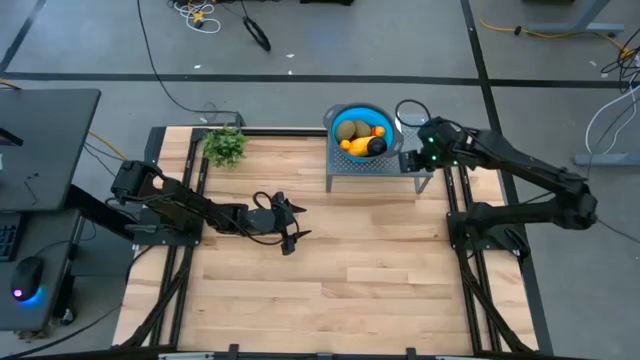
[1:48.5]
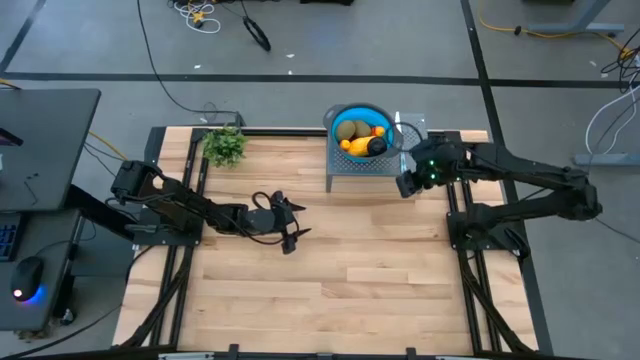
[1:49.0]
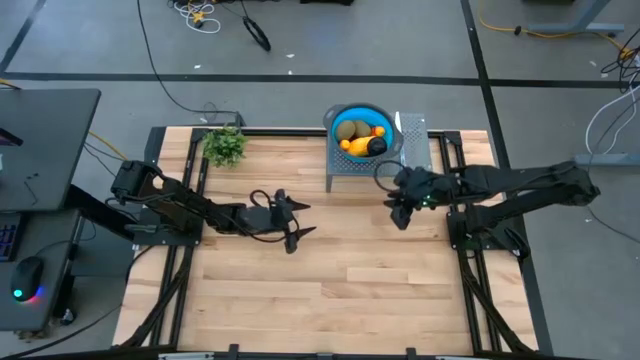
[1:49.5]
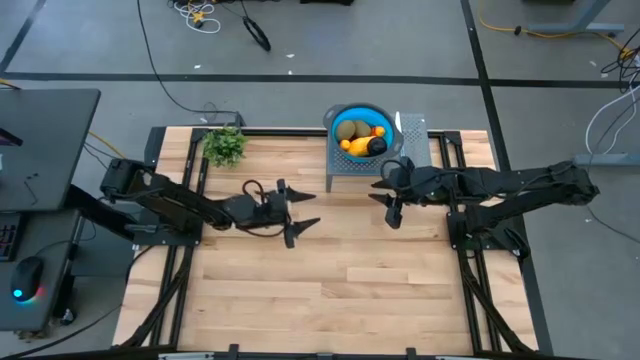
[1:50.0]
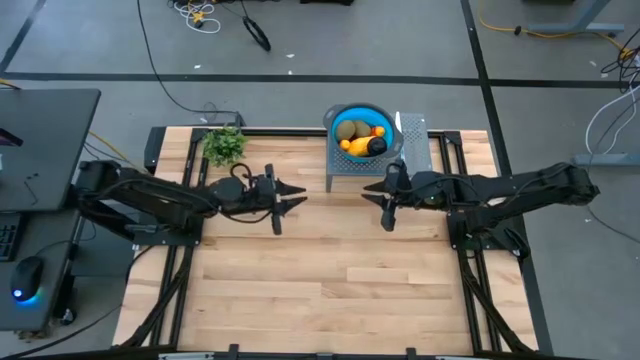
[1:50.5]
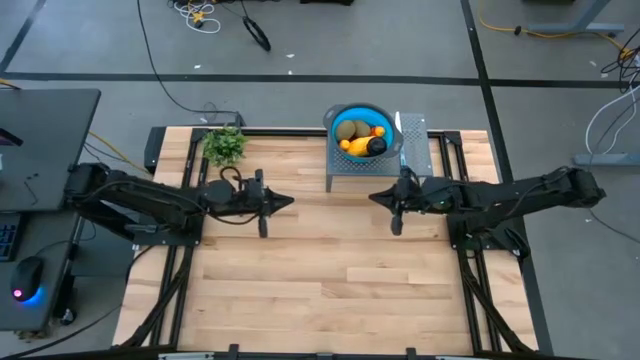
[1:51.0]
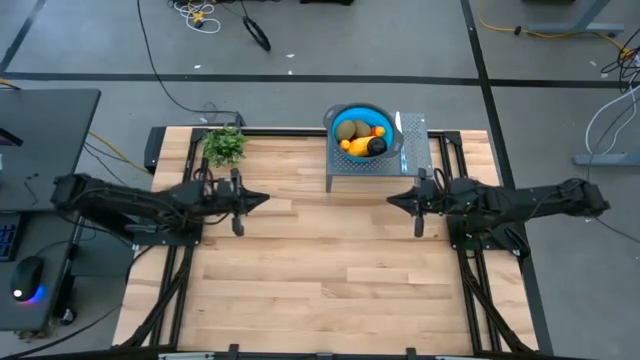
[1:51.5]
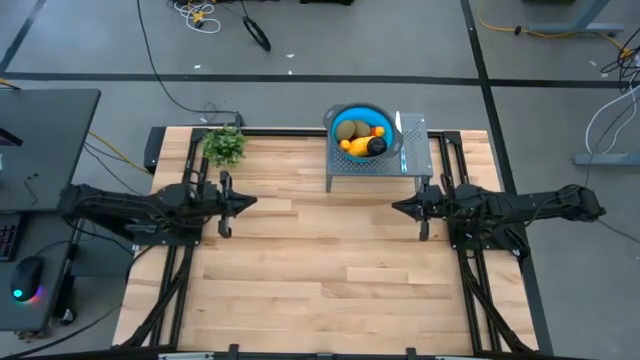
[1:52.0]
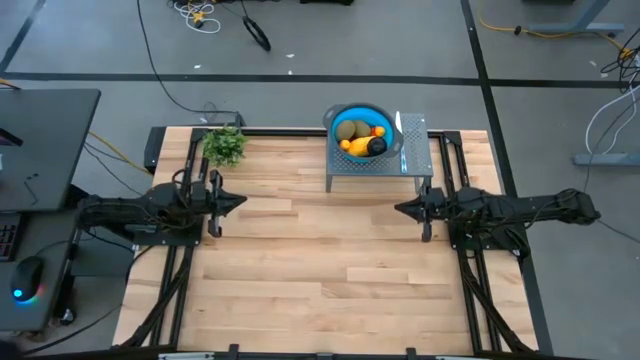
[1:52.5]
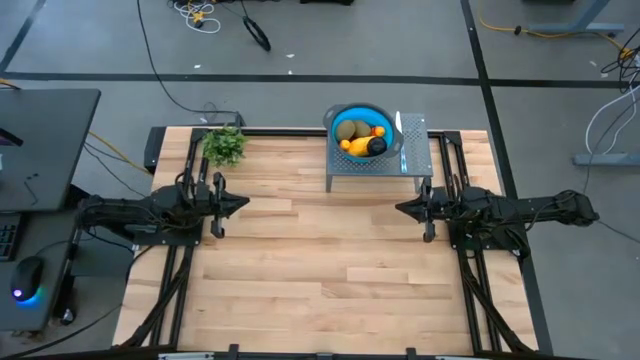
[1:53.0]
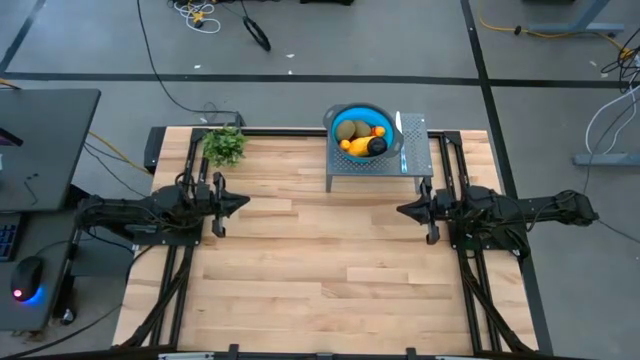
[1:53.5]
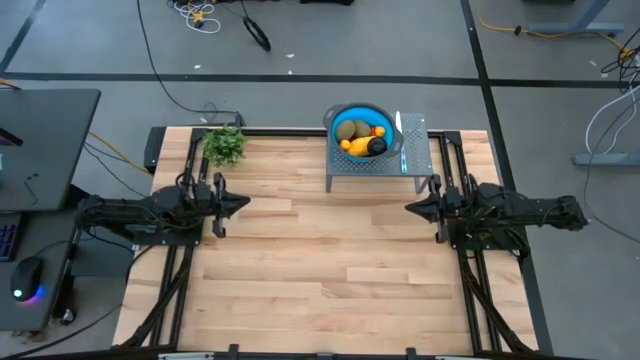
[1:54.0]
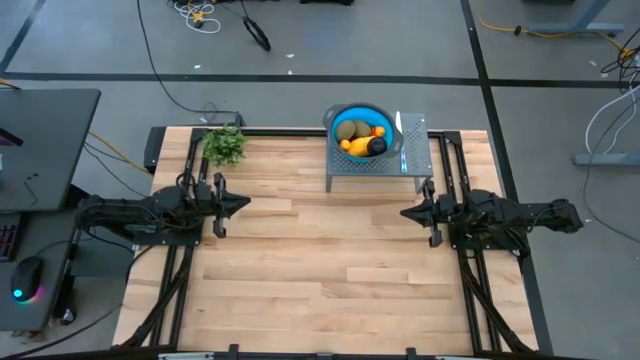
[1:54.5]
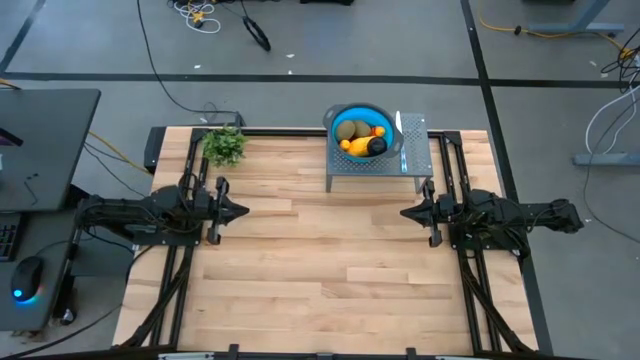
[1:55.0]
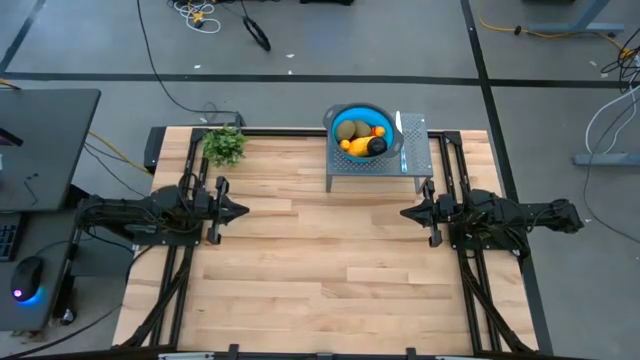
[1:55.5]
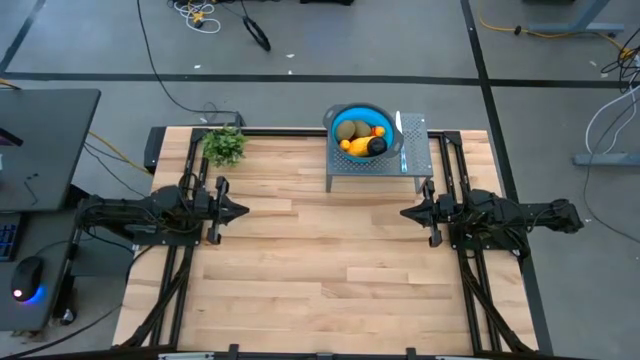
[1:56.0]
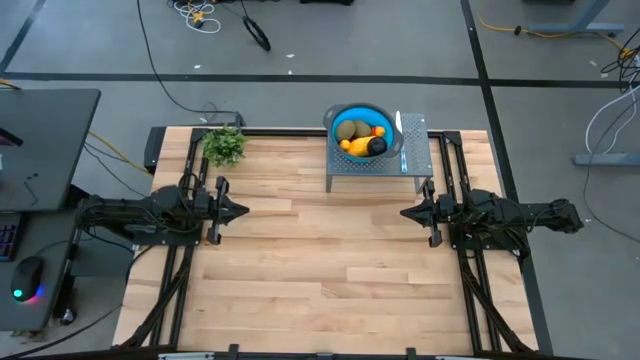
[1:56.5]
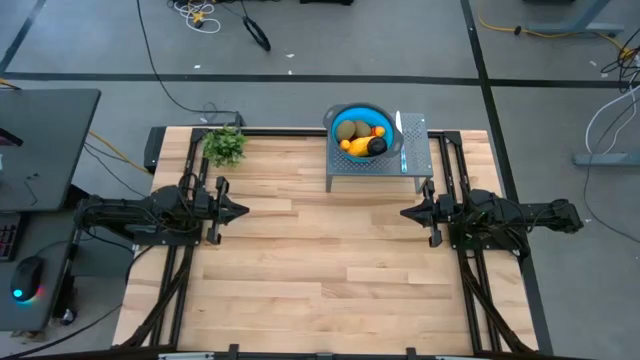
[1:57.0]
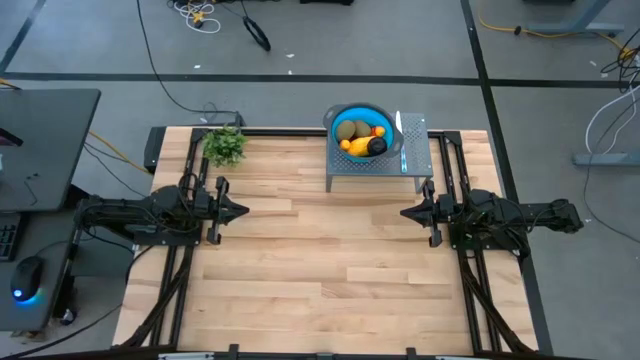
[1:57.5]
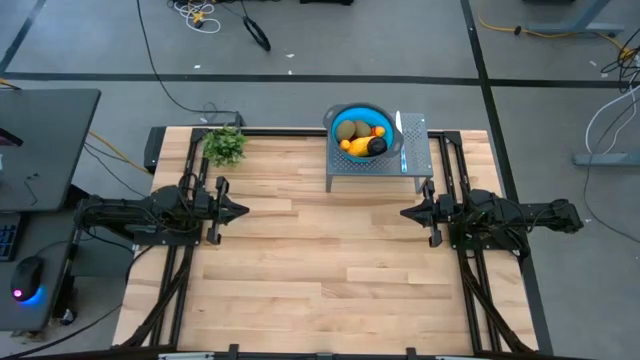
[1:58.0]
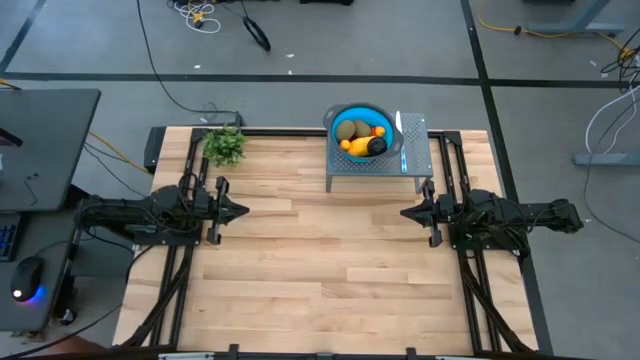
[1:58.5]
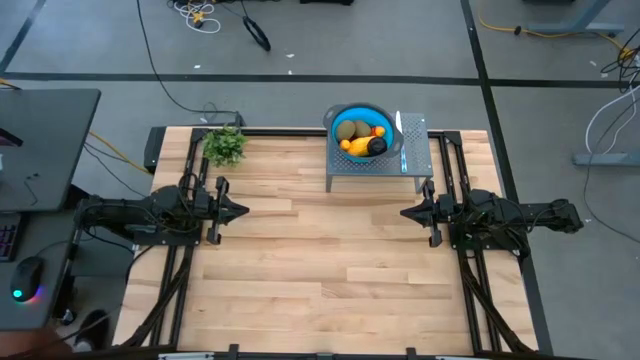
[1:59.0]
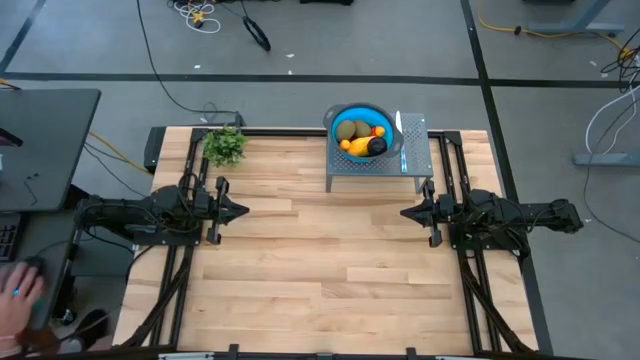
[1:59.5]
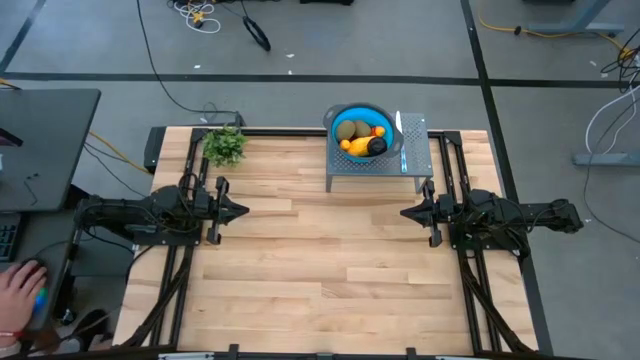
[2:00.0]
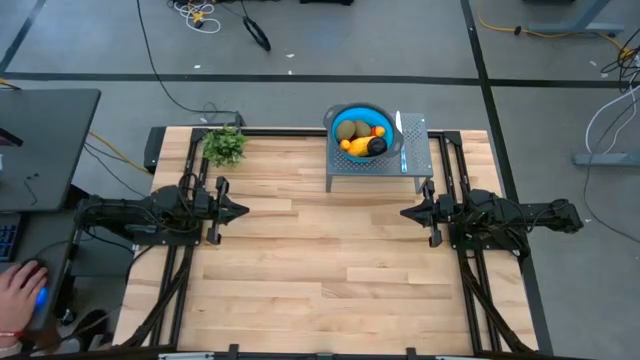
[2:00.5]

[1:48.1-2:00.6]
Task: Pick & Place Fruit
Return To Home Position

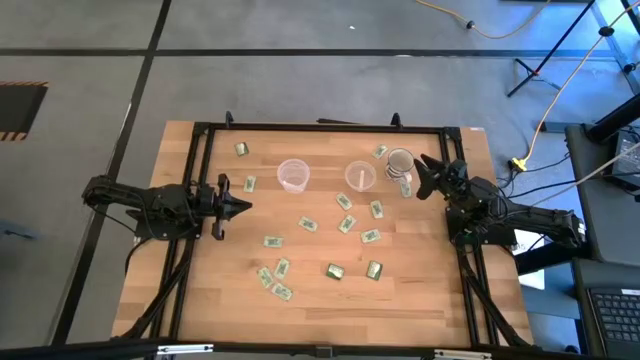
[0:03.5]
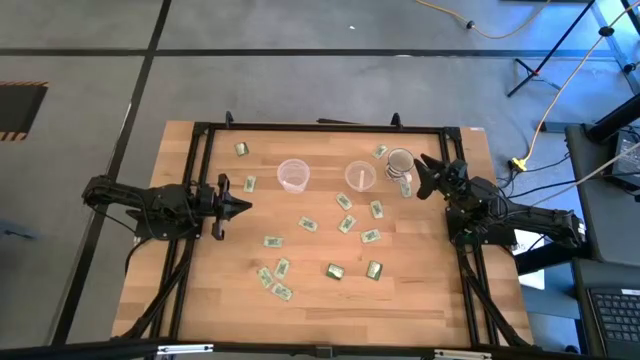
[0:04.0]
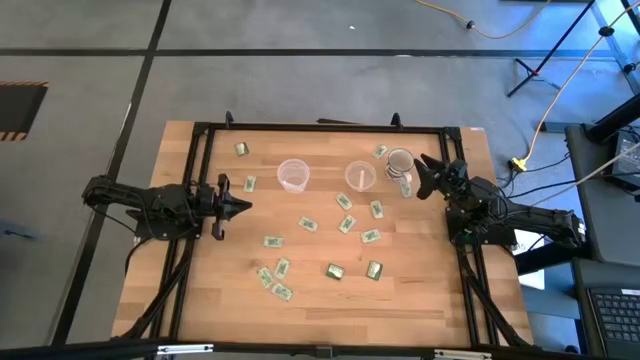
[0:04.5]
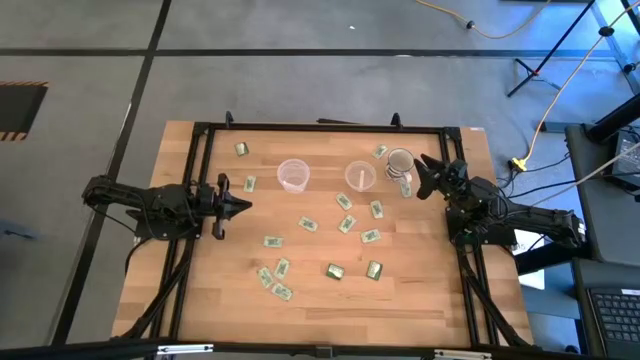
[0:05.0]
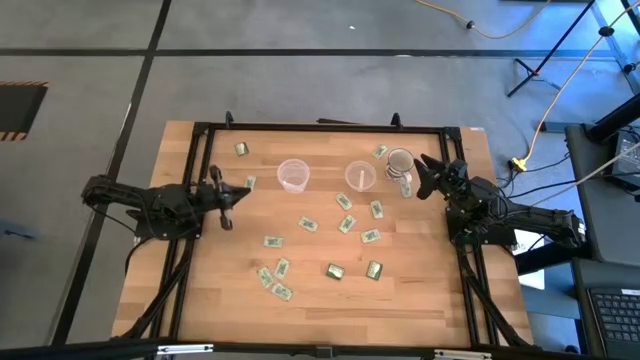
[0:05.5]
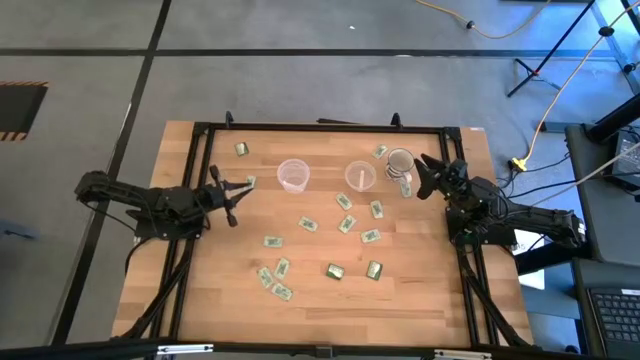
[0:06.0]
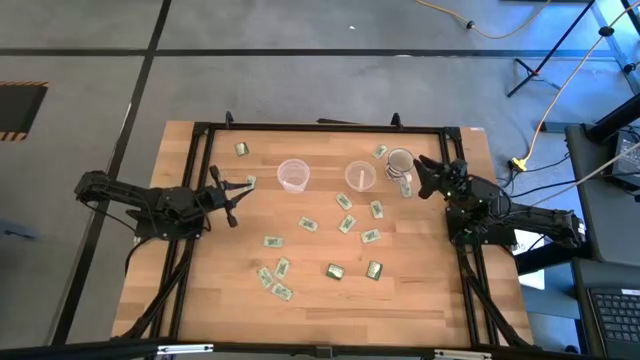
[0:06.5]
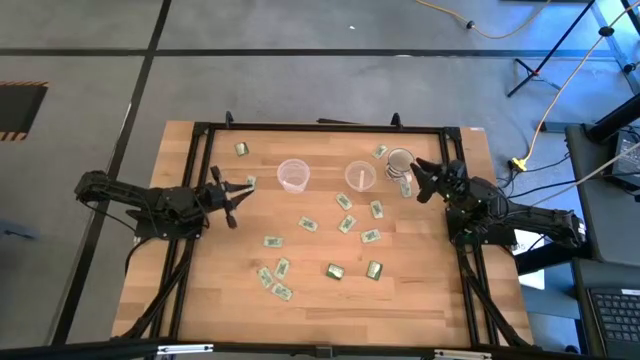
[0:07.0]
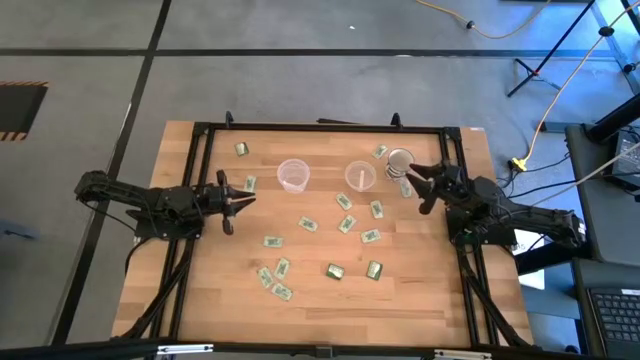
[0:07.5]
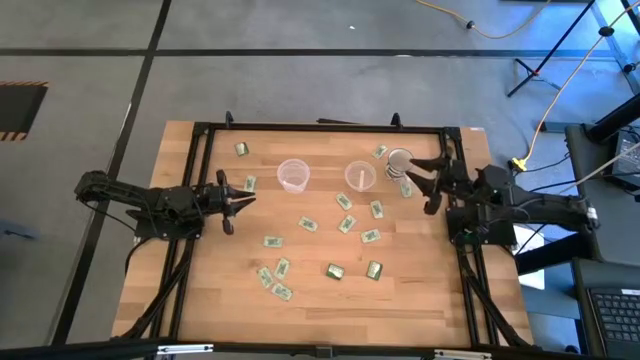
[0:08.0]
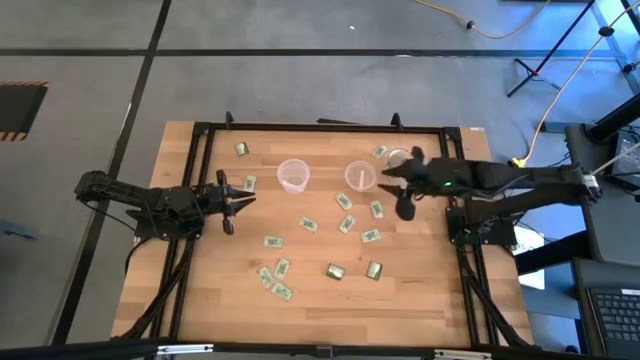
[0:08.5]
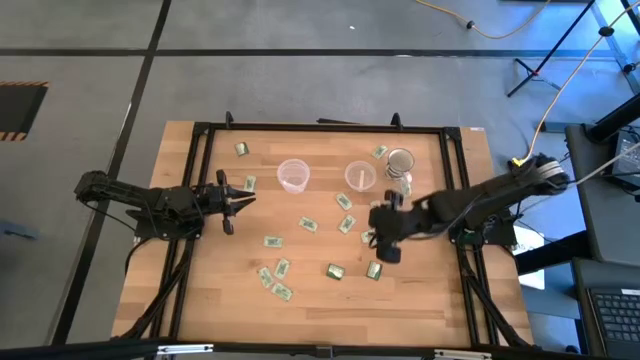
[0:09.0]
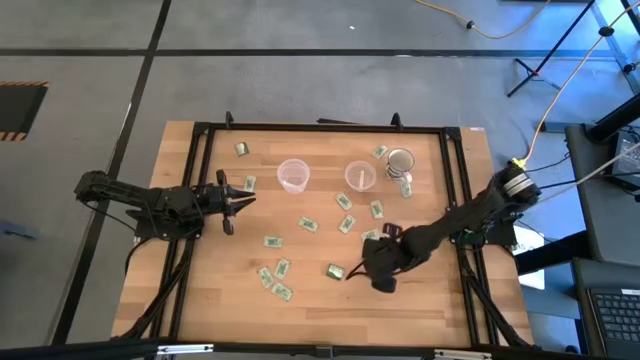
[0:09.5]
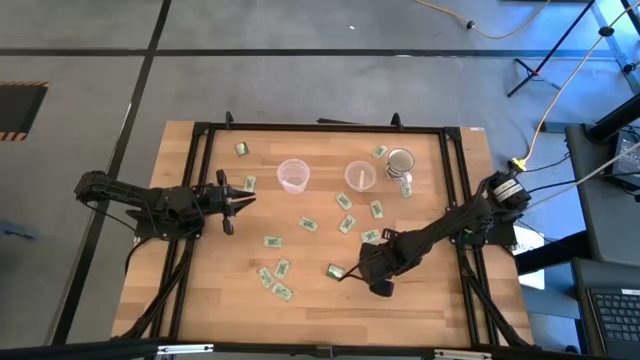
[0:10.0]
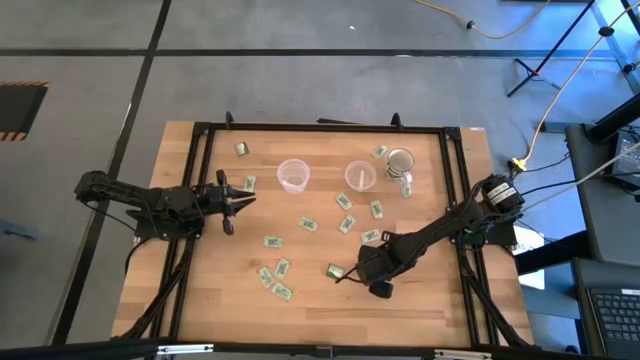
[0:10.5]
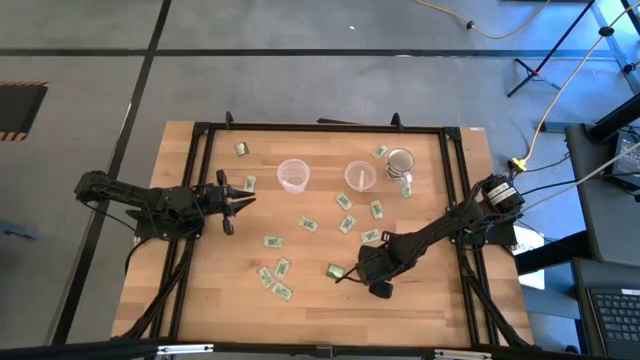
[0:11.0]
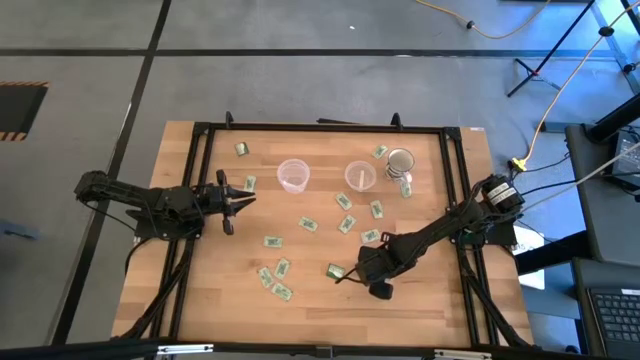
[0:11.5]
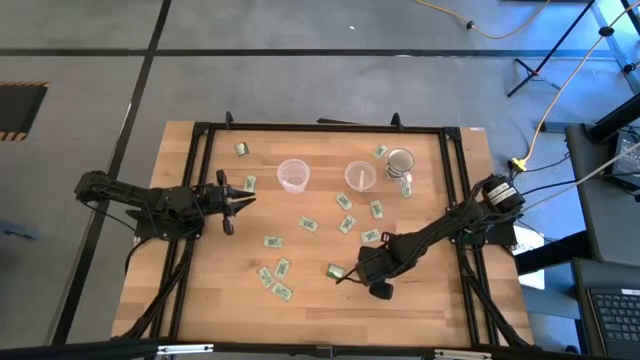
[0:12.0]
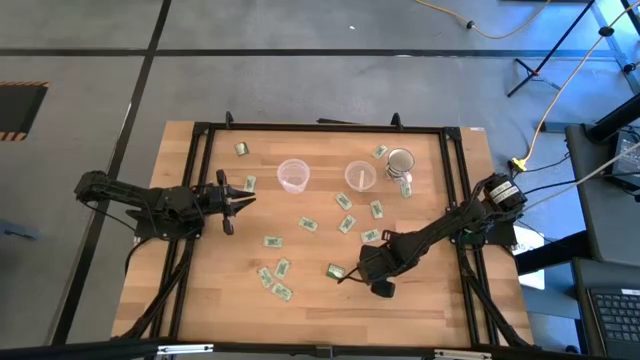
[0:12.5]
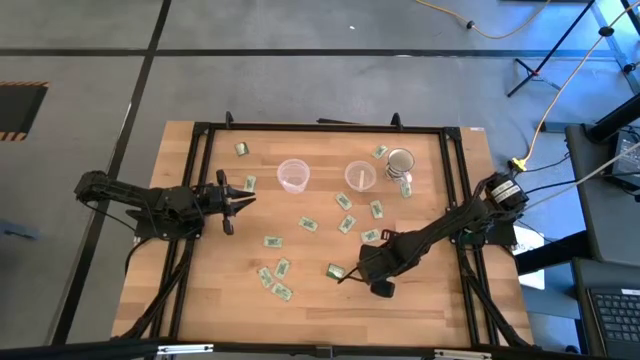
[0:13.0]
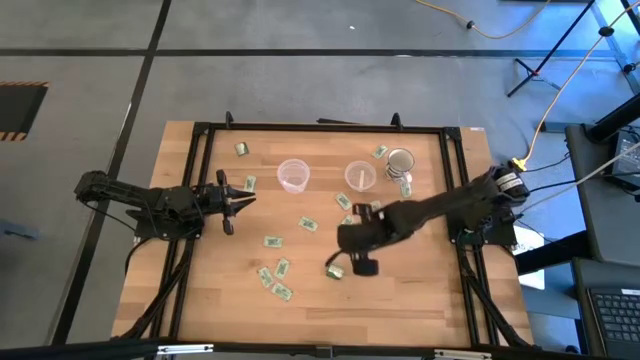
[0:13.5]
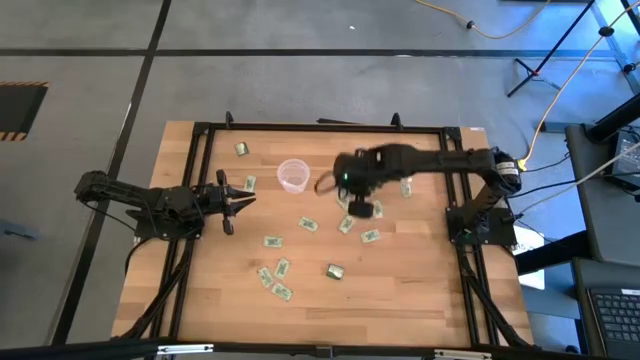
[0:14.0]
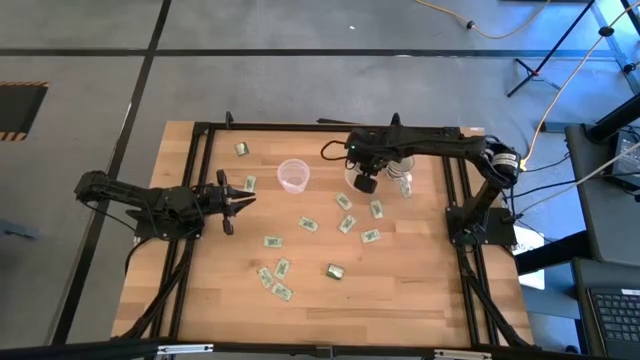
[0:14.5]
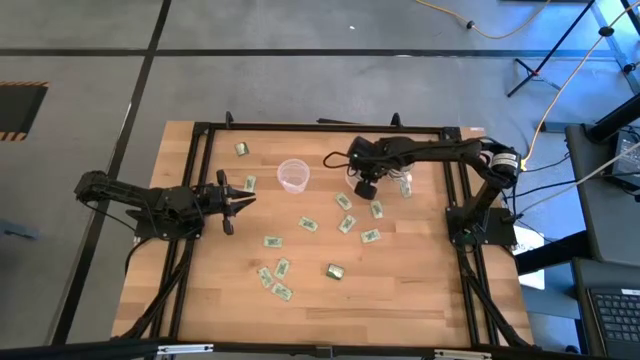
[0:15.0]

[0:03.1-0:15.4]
Task: Pick and place Stevia / Truvia into bins
Put the green truvia packet into the small transparent container
